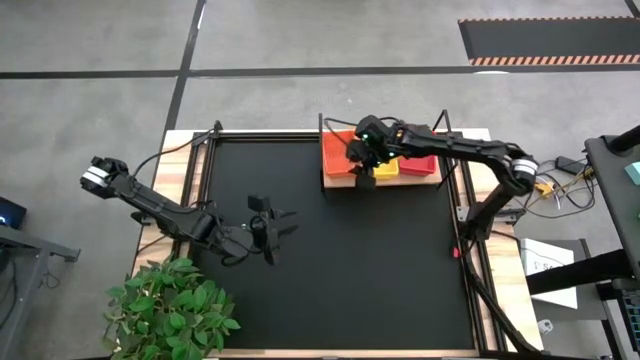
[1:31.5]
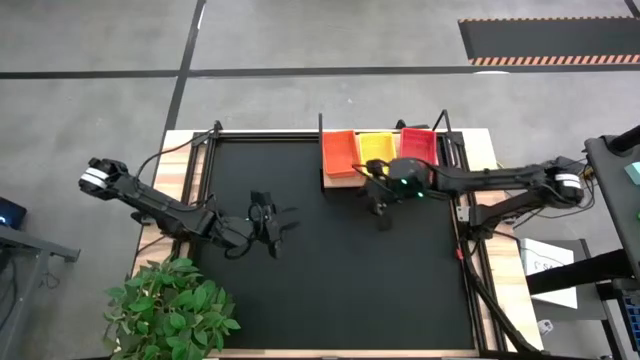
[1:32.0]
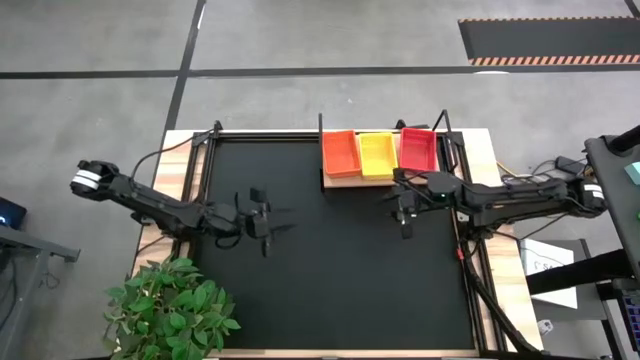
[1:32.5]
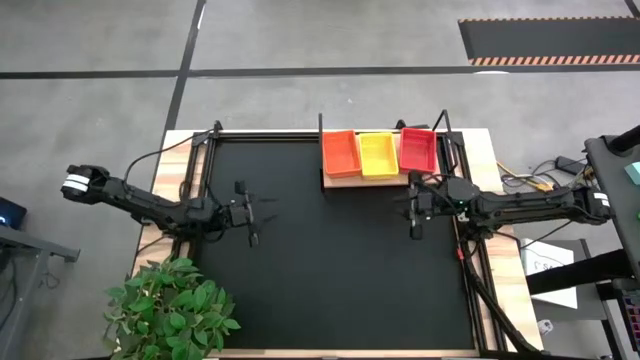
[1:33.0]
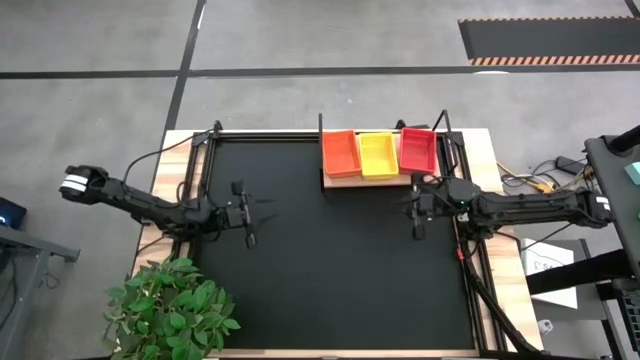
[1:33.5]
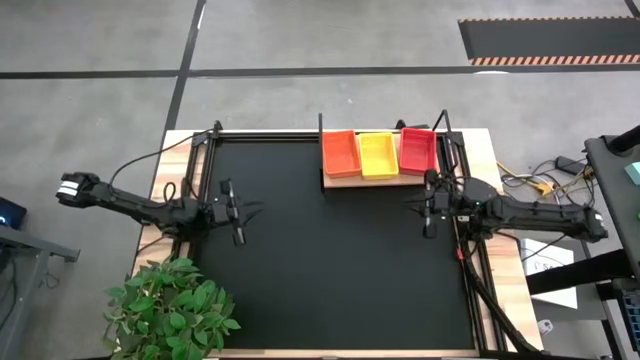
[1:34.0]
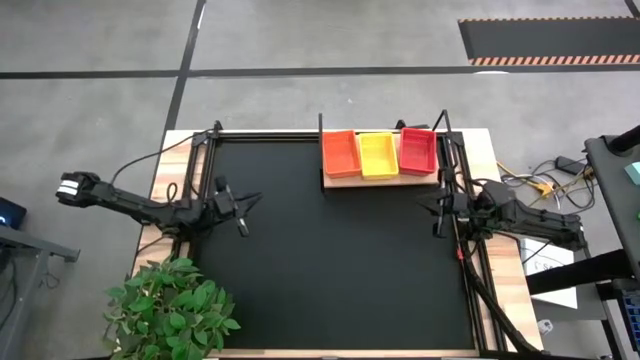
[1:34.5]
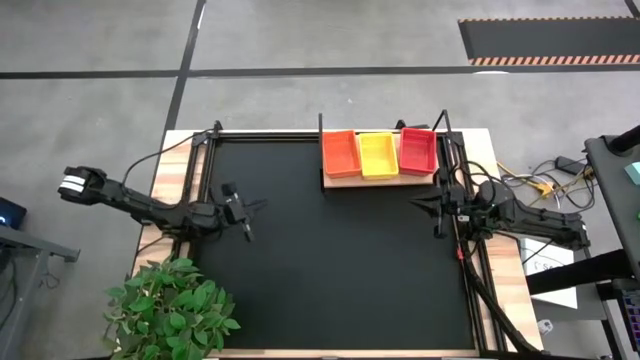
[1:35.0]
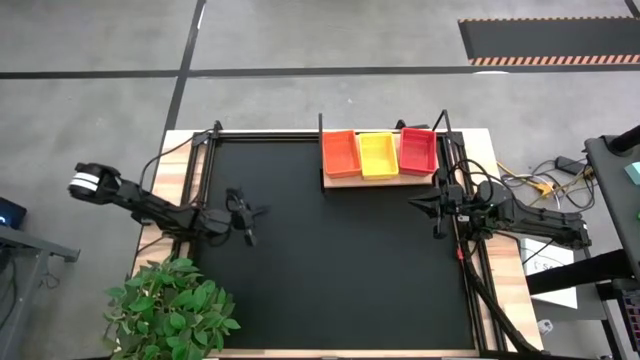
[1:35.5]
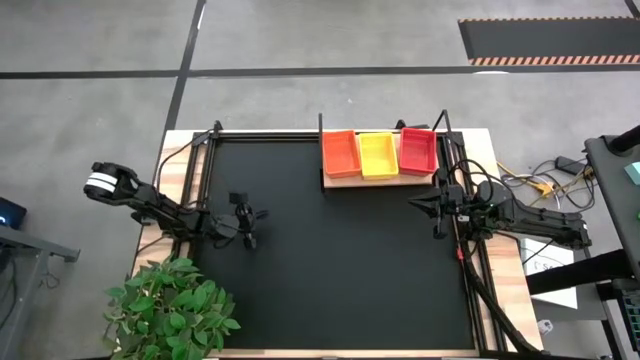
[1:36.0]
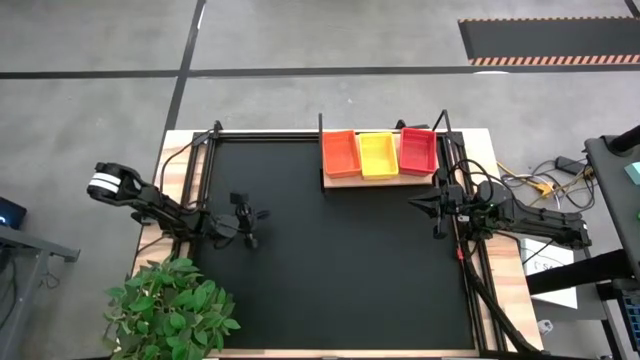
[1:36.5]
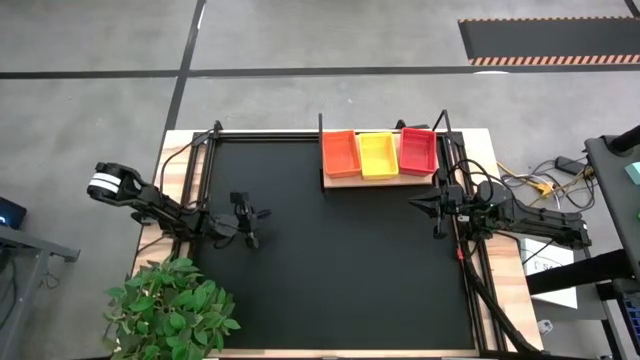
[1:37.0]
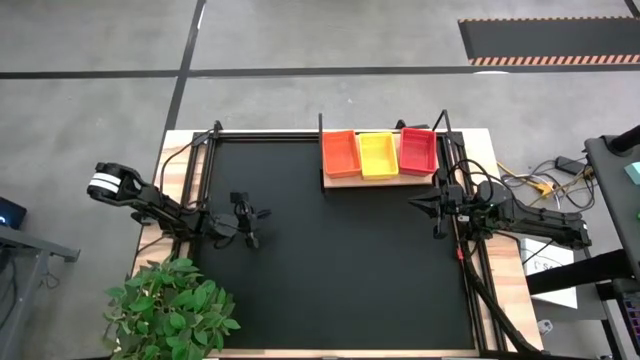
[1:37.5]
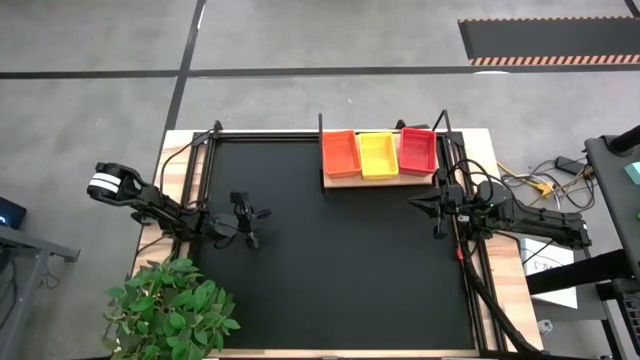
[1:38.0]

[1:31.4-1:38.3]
Task: Stack baskets on shelf by color
Return to Home Position

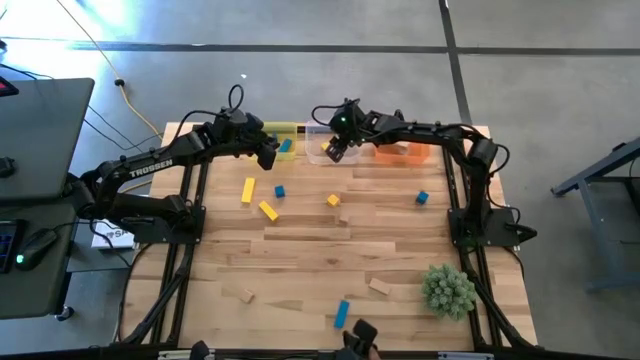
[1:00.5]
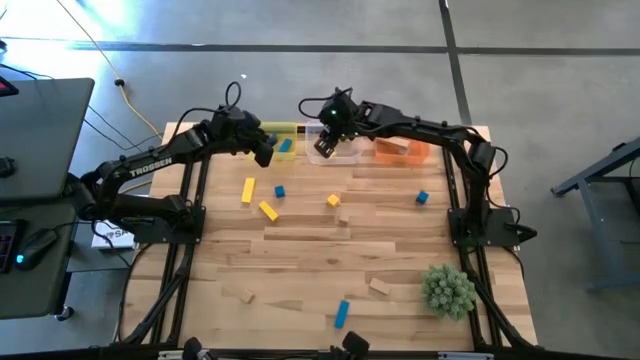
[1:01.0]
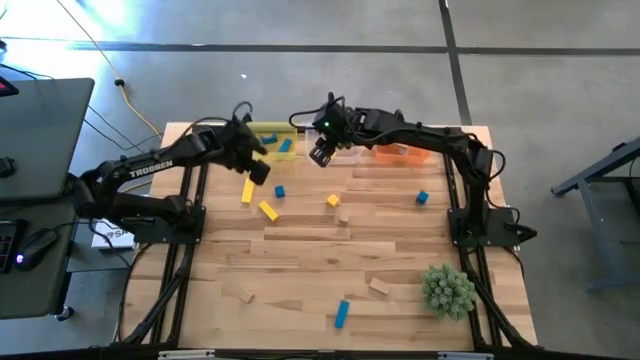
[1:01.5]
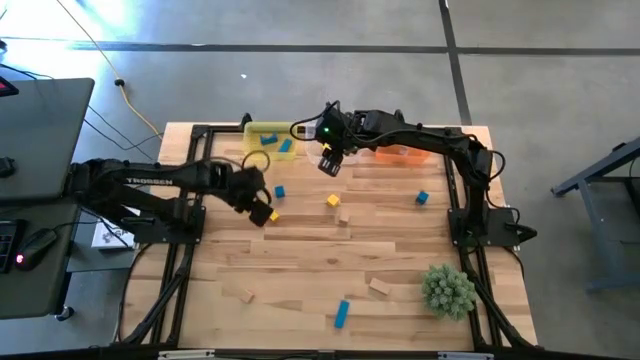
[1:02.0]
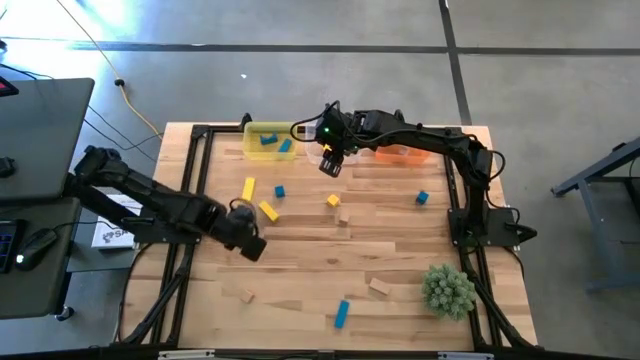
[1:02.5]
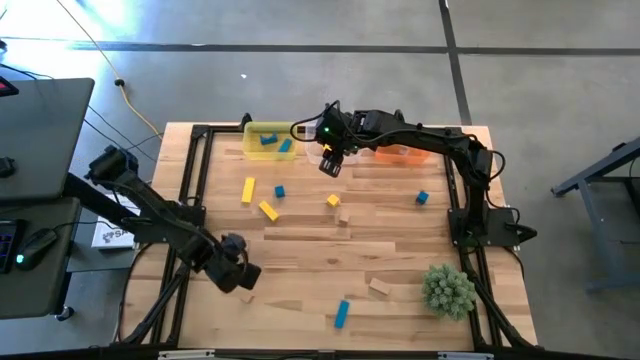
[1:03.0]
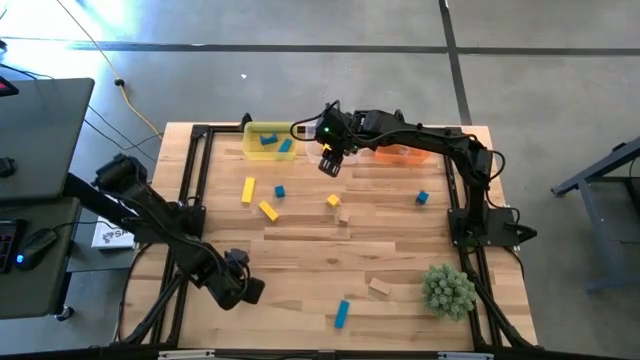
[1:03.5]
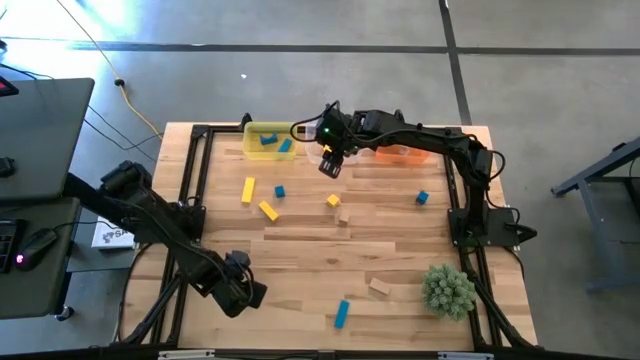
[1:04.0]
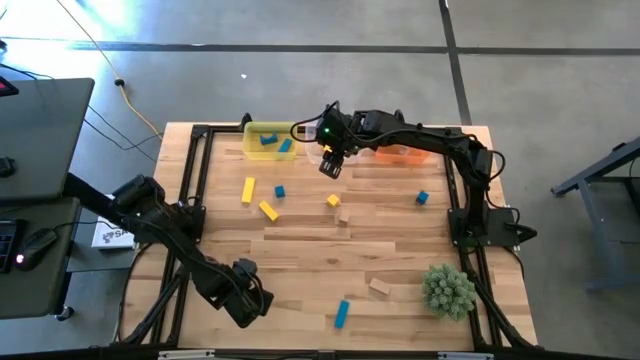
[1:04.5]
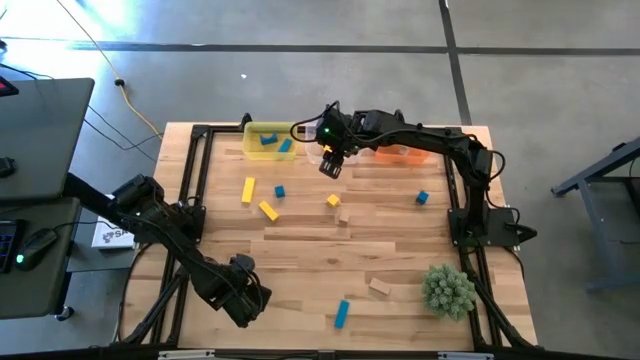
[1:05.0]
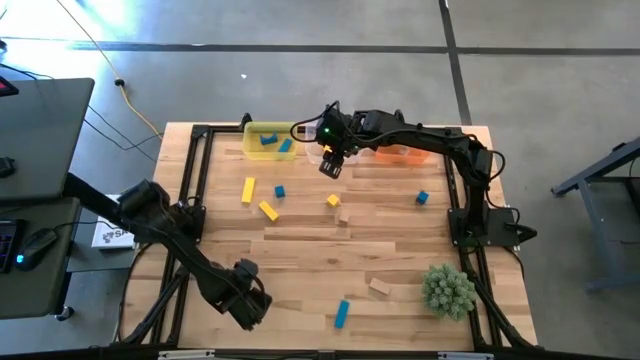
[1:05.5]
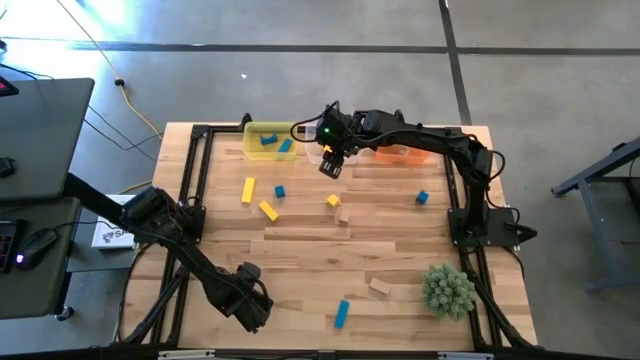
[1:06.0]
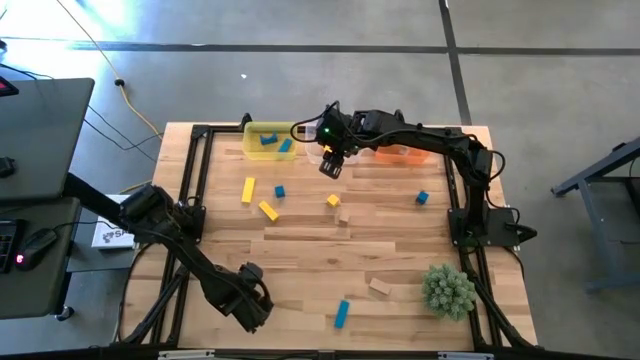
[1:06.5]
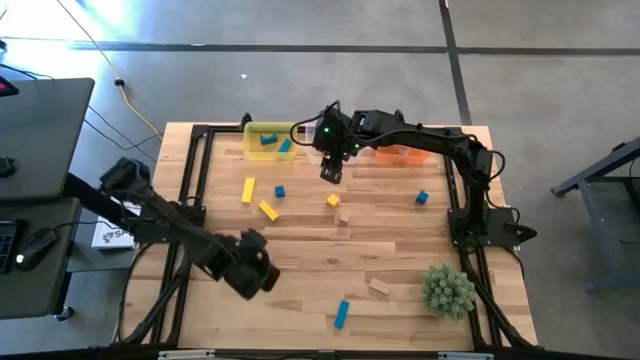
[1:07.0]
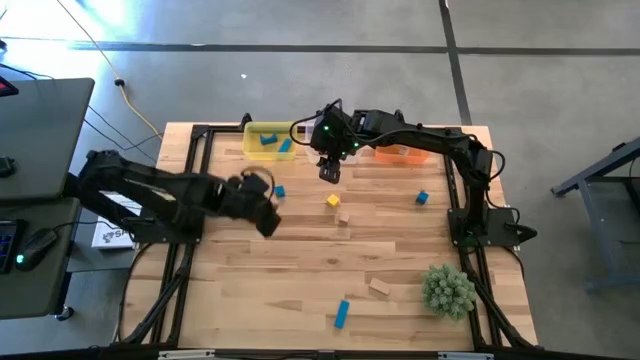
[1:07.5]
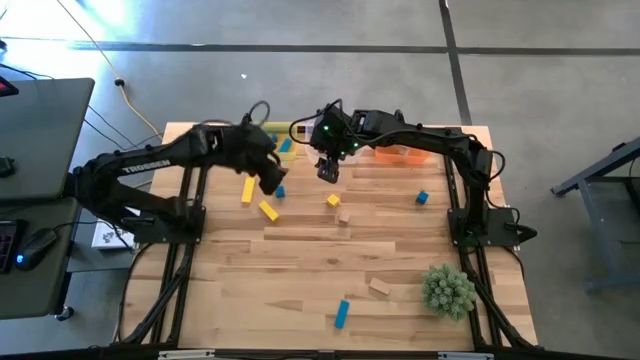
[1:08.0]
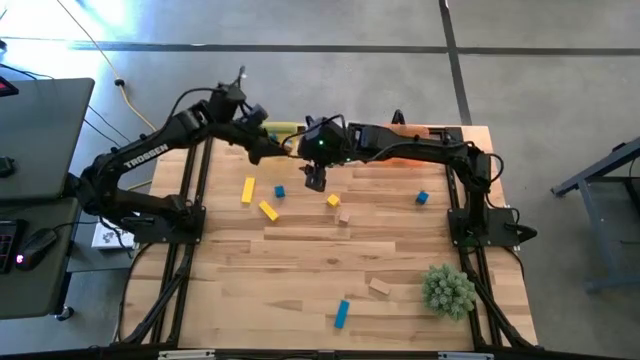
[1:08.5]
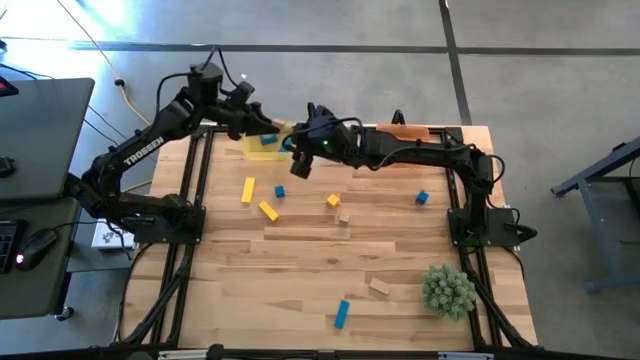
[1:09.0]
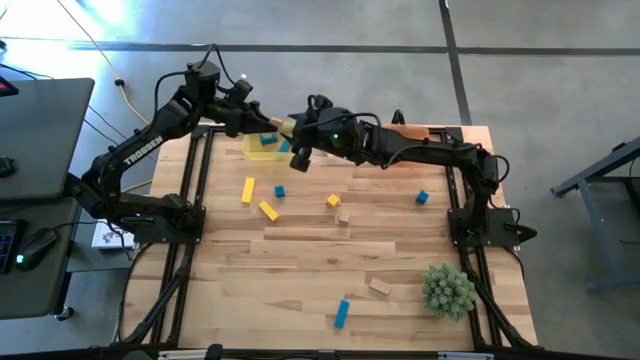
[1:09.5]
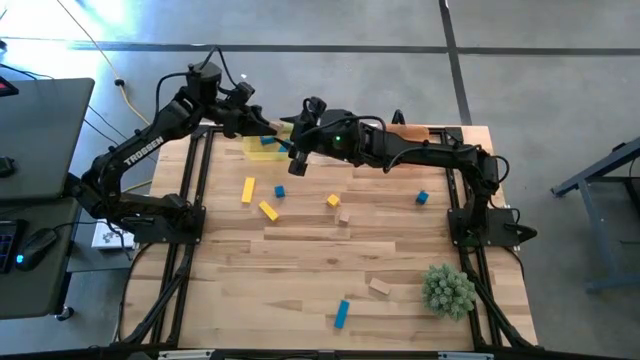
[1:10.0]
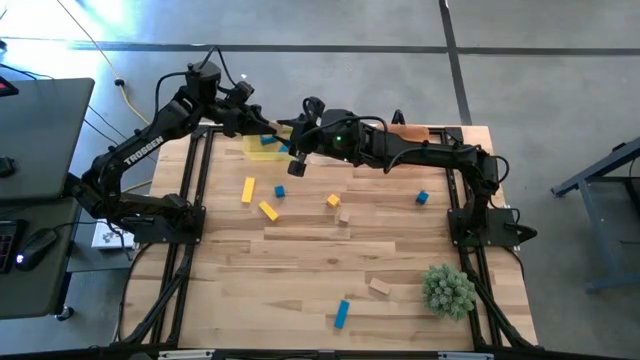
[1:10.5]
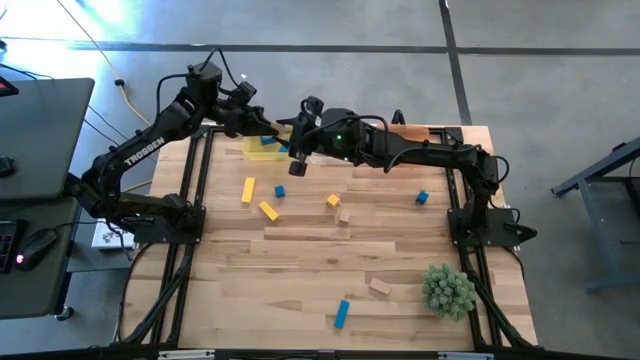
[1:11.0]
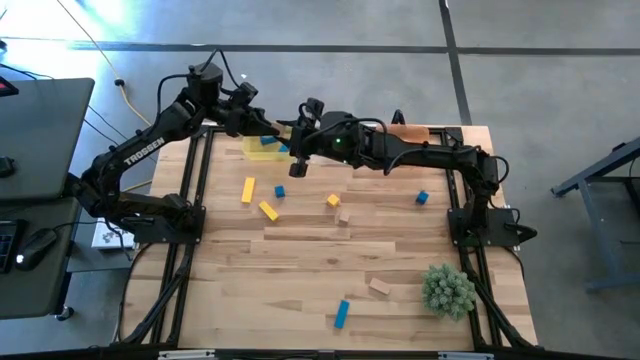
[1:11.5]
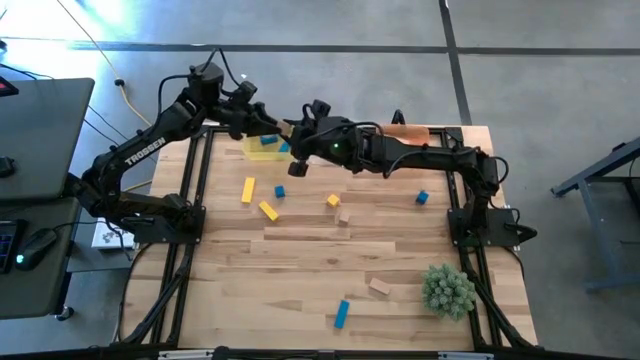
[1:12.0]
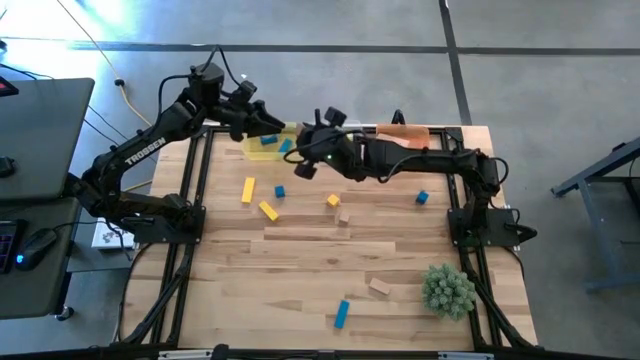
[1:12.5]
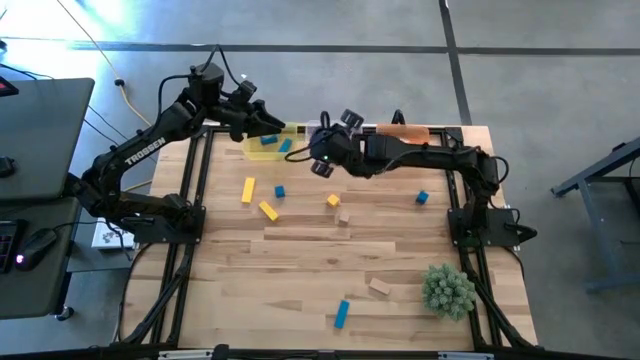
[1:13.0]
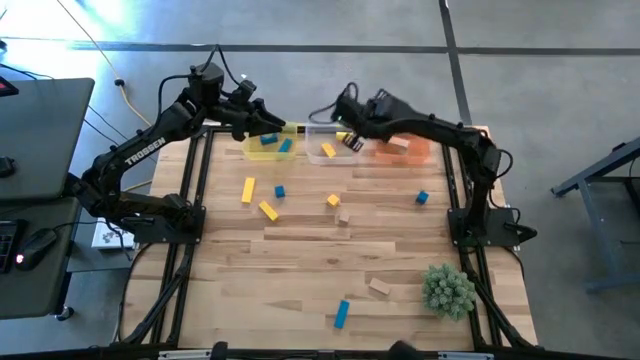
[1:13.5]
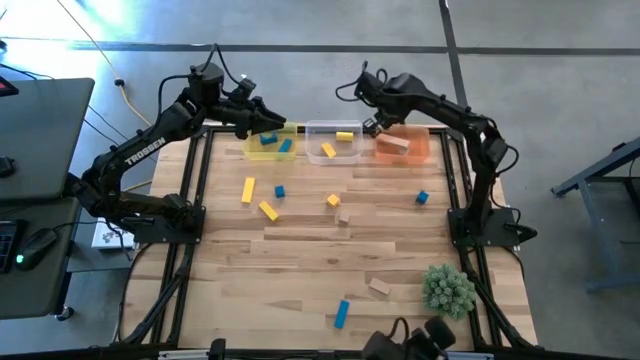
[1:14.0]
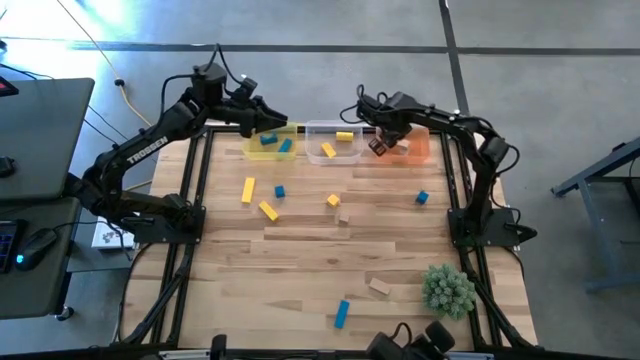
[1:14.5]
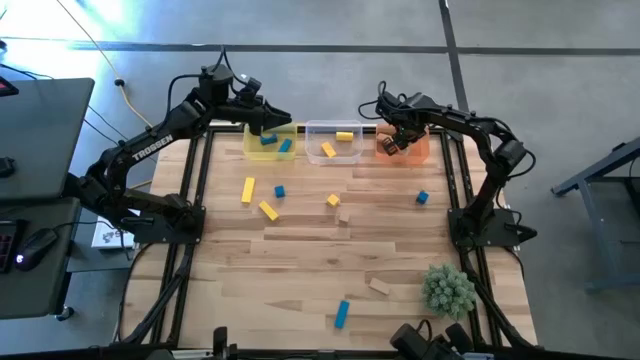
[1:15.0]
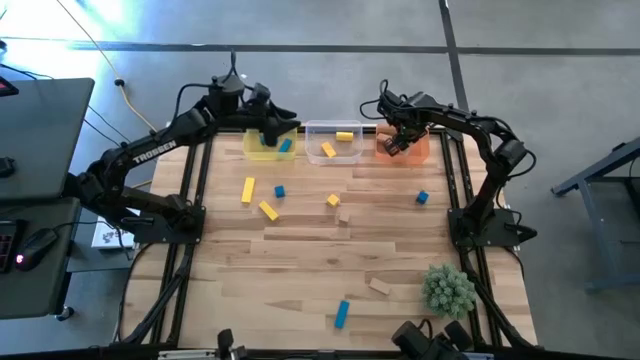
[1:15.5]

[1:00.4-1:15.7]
Task: Sort & place blocks by color
Put the brown block into the orange bin
